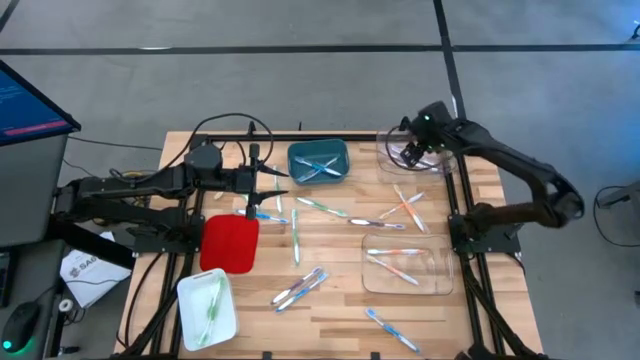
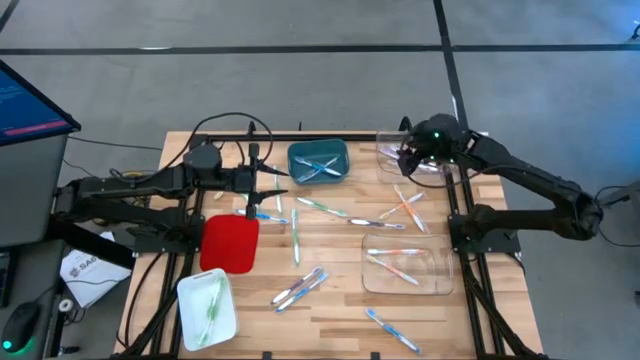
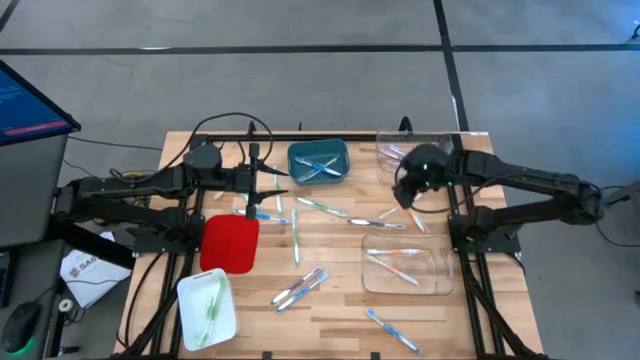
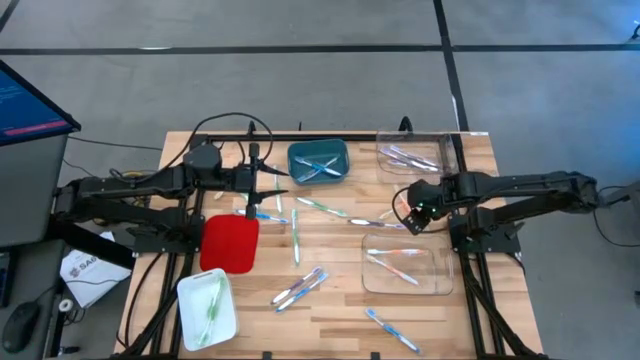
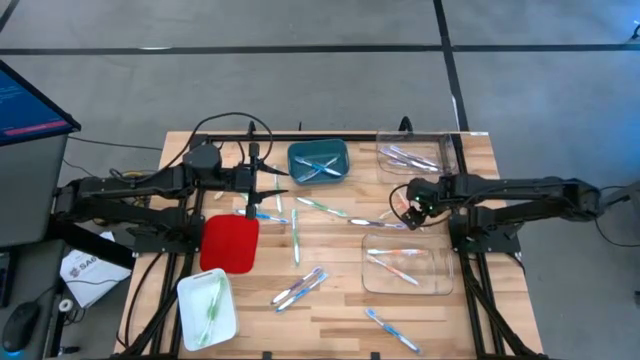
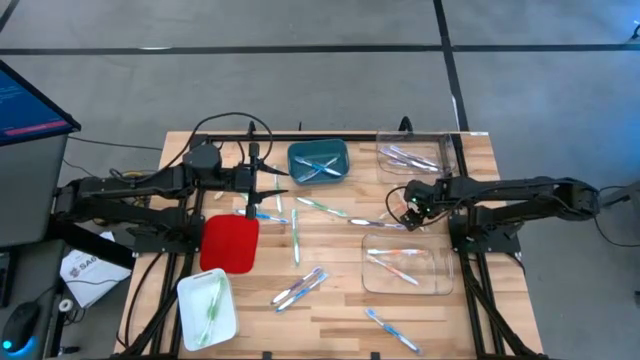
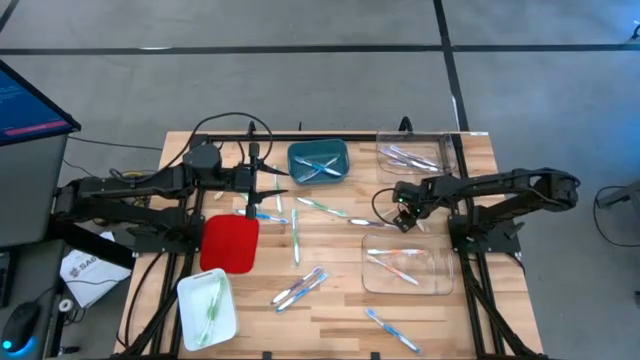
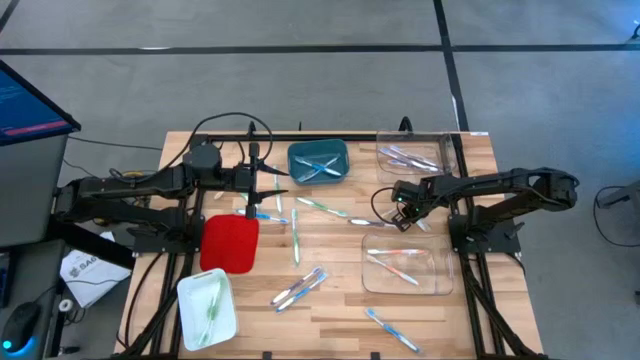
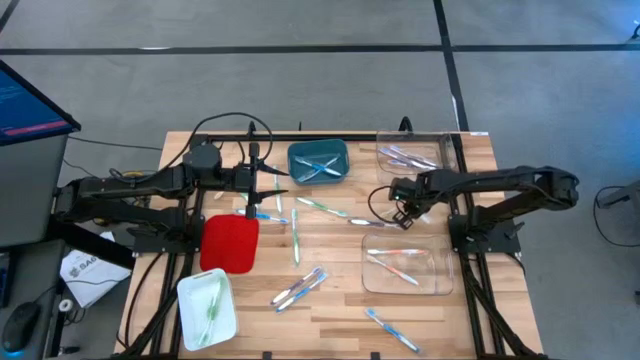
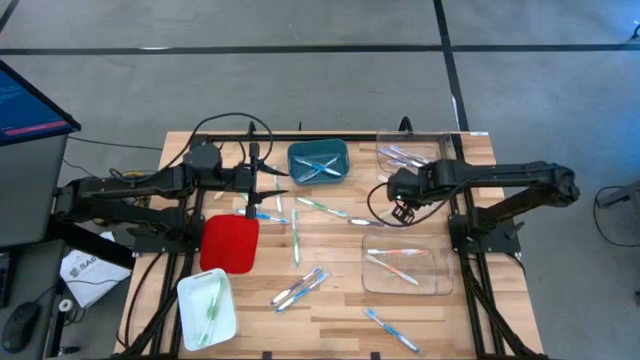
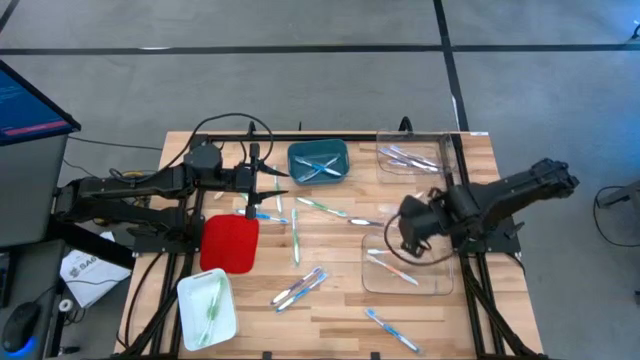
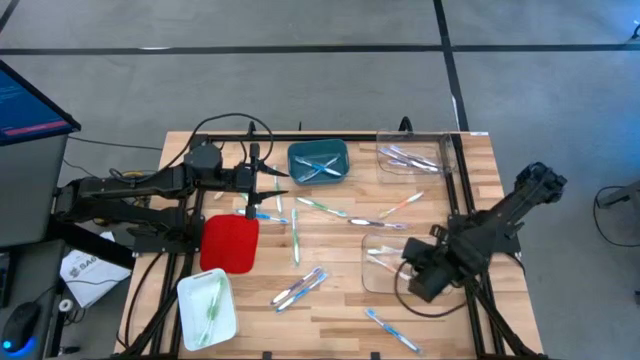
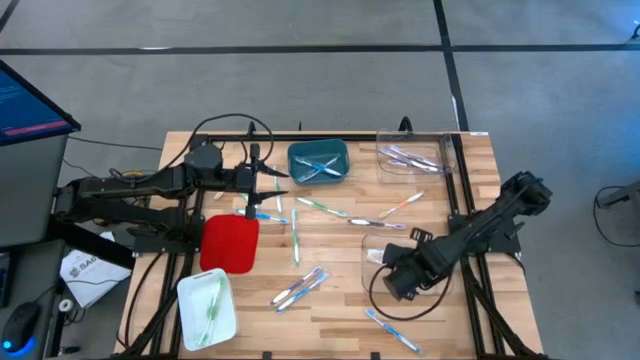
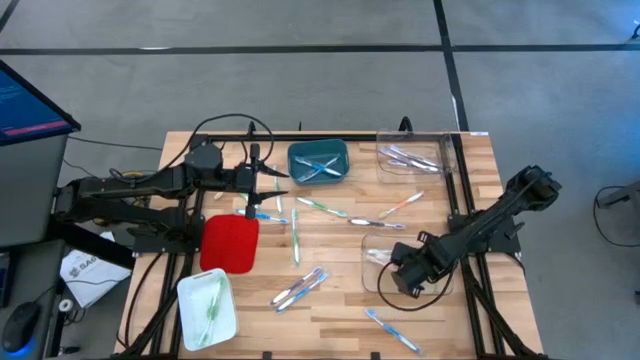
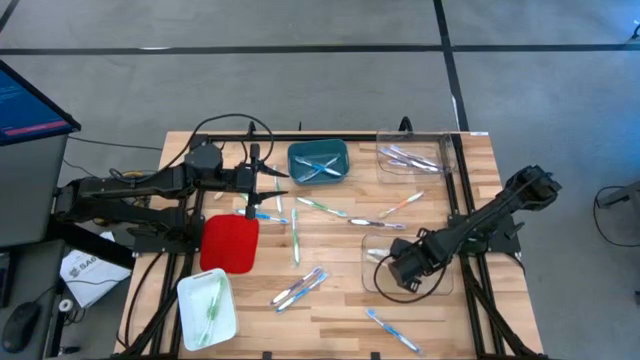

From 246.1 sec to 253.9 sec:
Task: Pick & Place Toothbrushes
Put the orange toothbrush into the bottom transparent bin

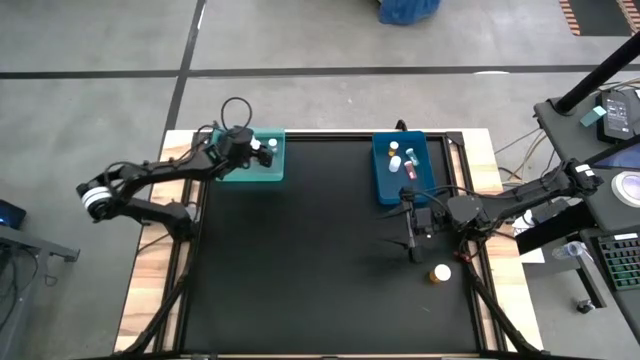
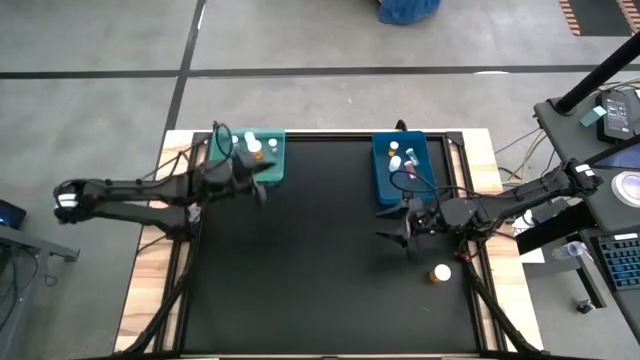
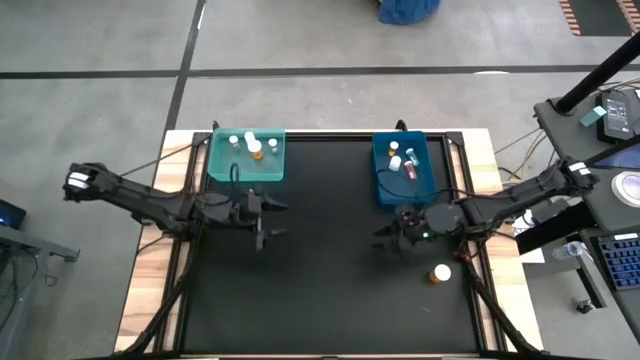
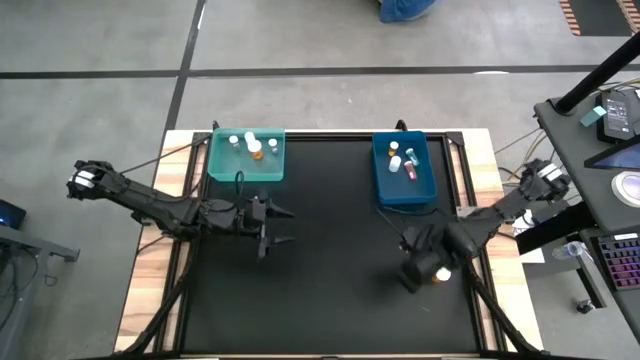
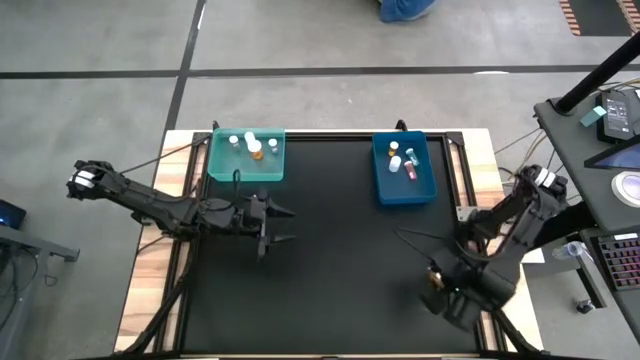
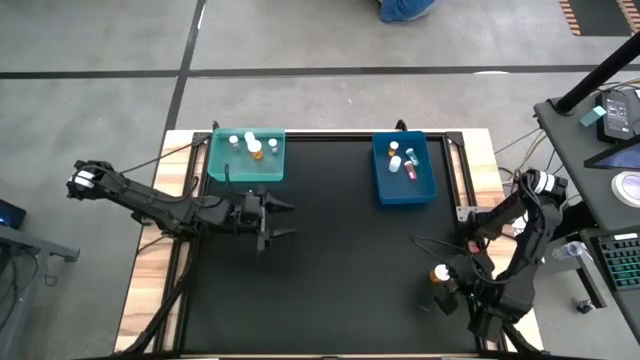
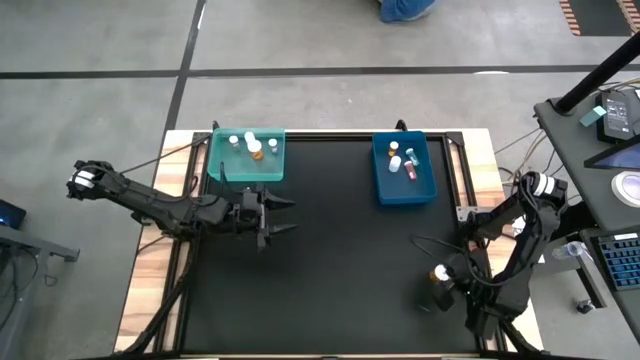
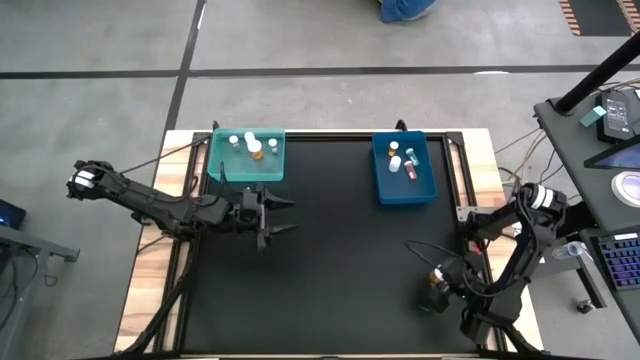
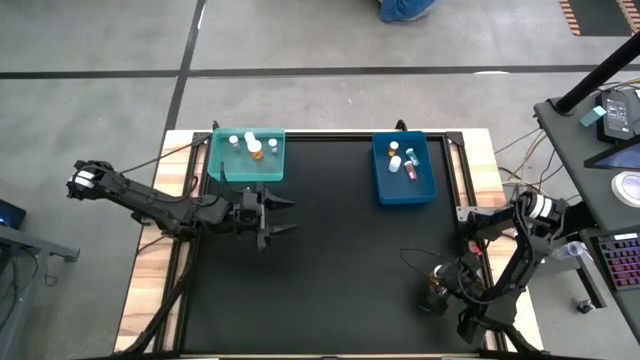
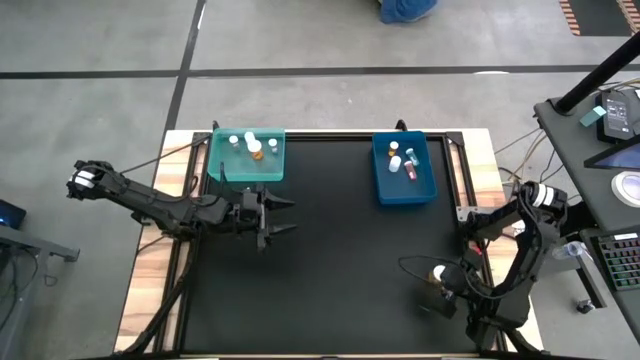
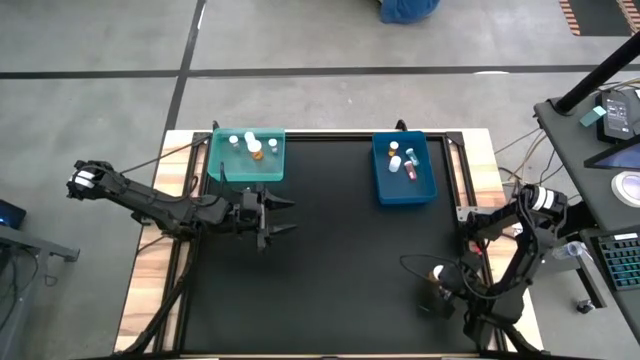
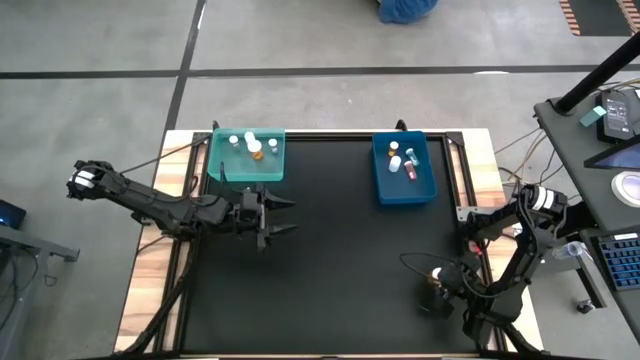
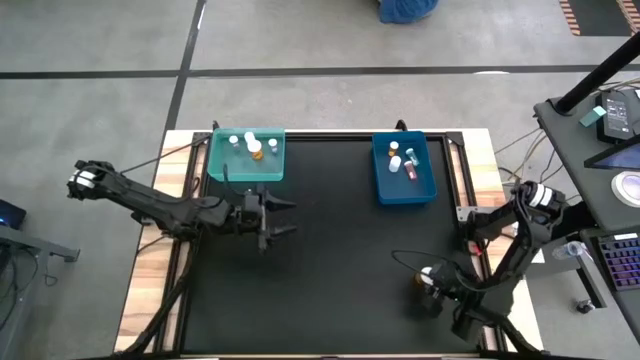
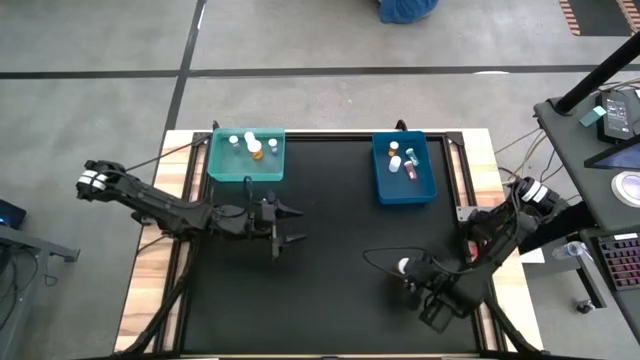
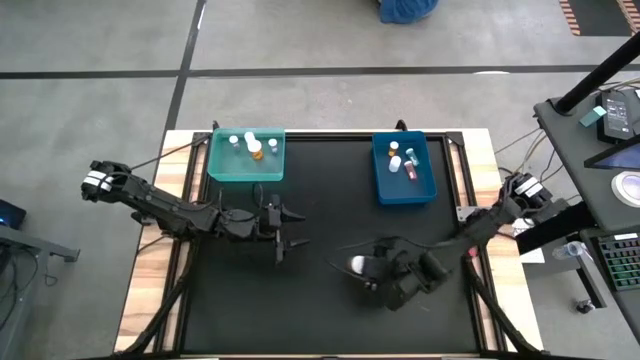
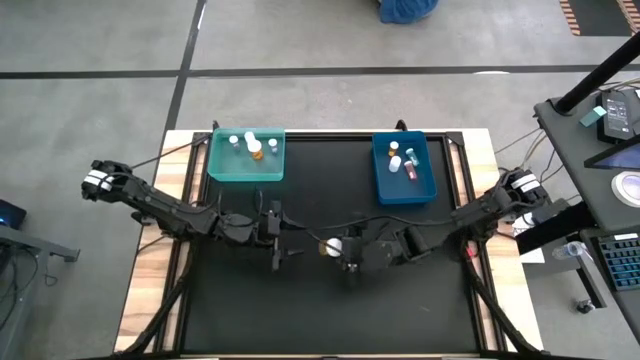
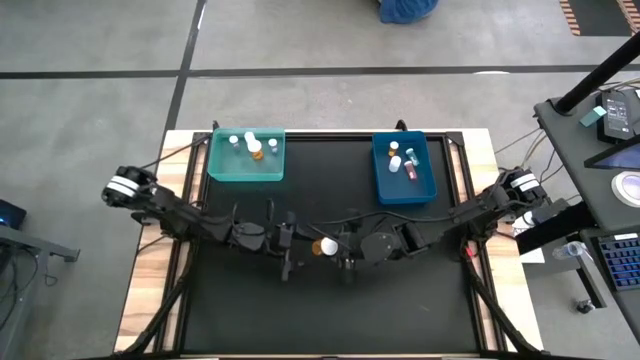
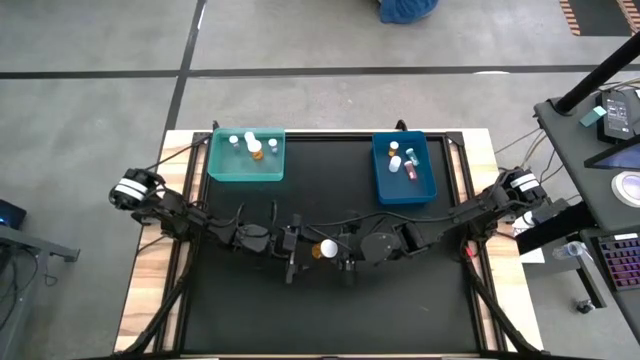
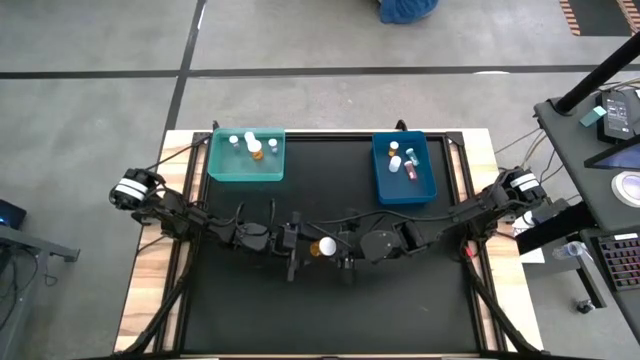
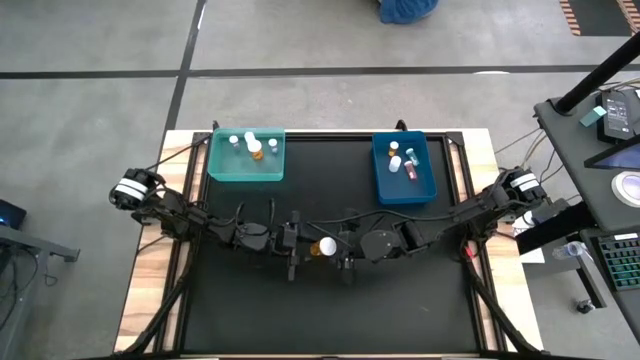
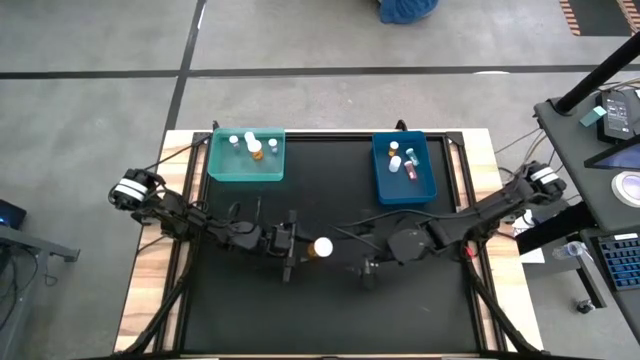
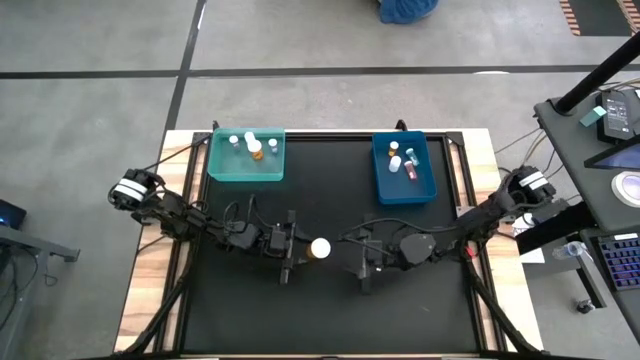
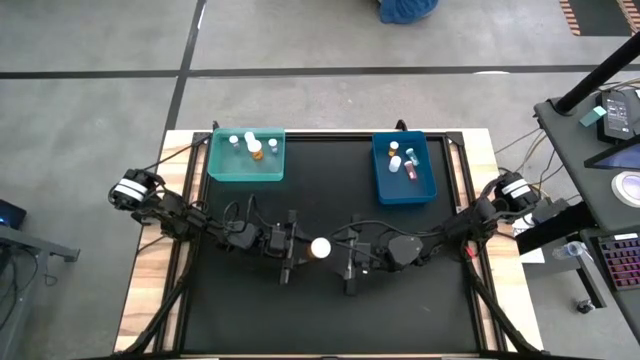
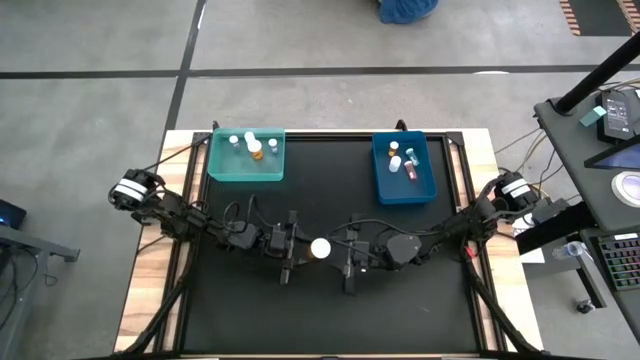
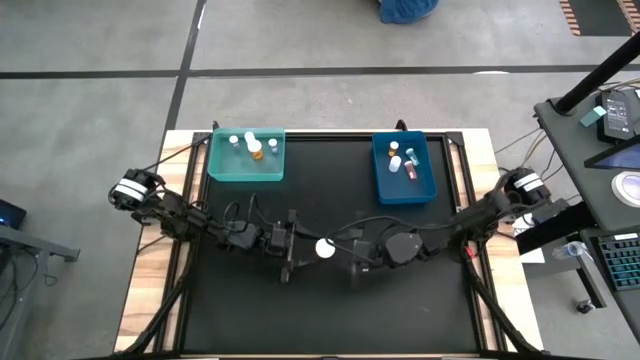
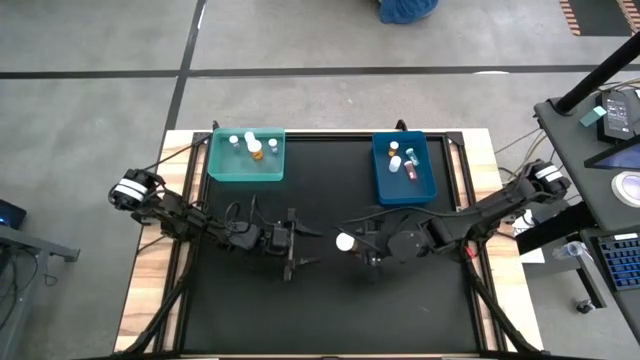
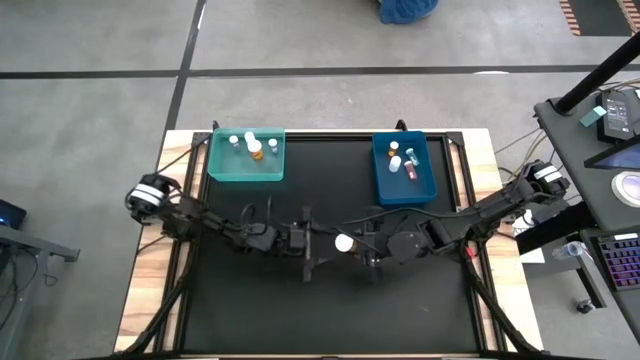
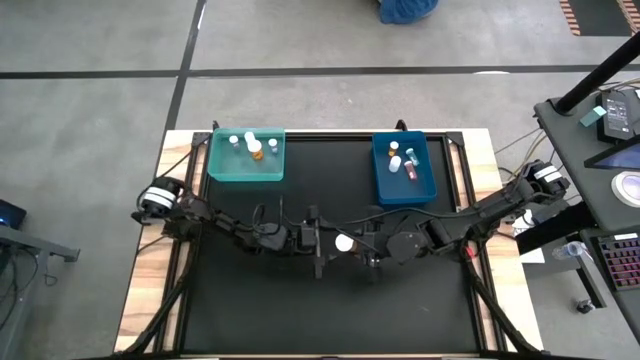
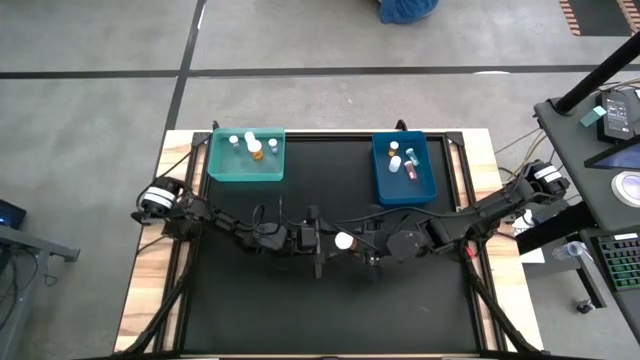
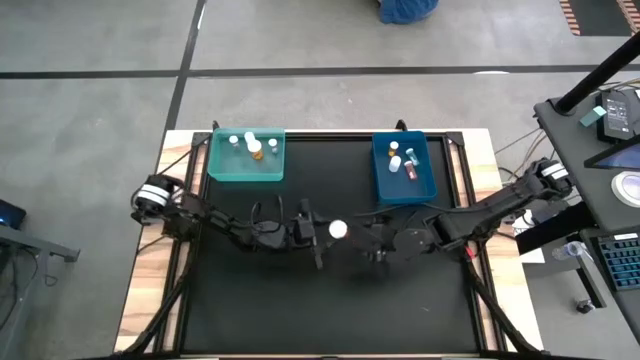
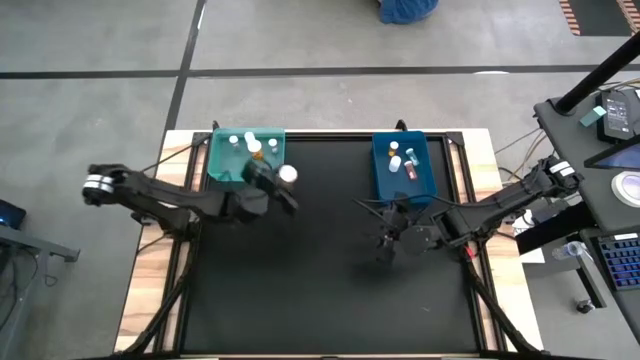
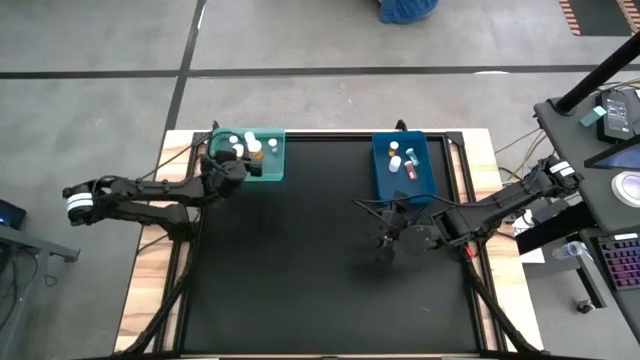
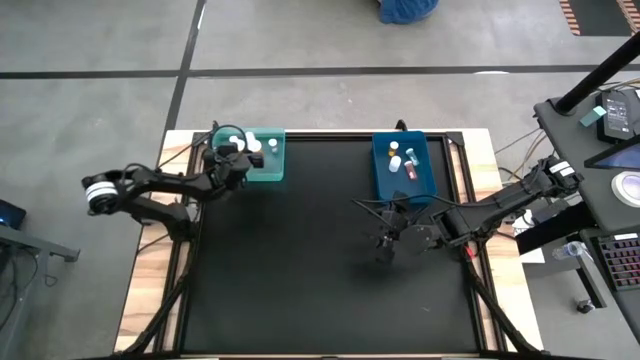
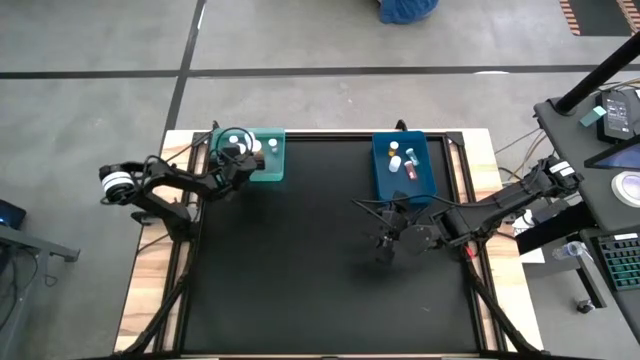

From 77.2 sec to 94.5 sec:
Task: Pick and place medicine bottles into bin by pill shape (circle, oval)
Put the orange capsule bottle into the light blue bin
